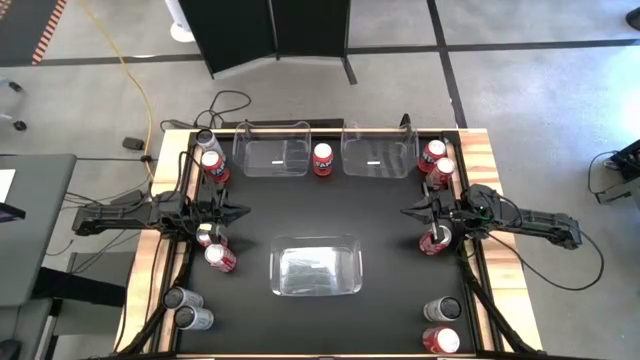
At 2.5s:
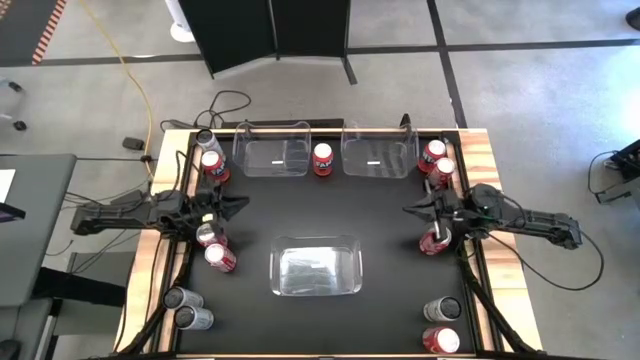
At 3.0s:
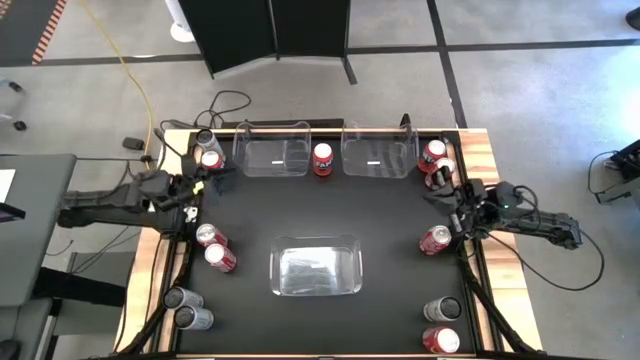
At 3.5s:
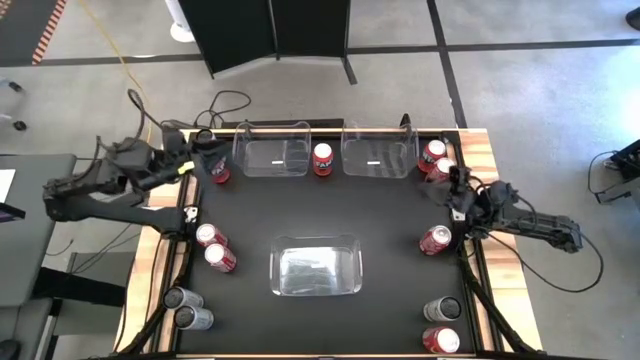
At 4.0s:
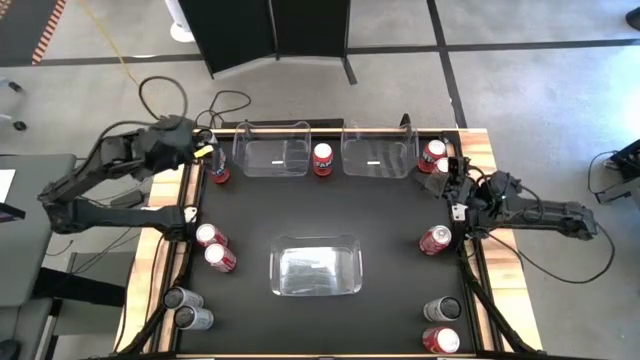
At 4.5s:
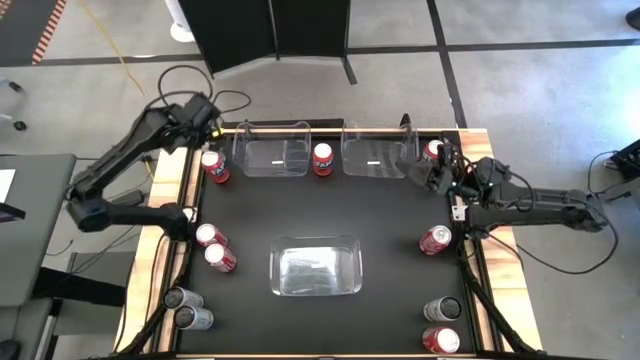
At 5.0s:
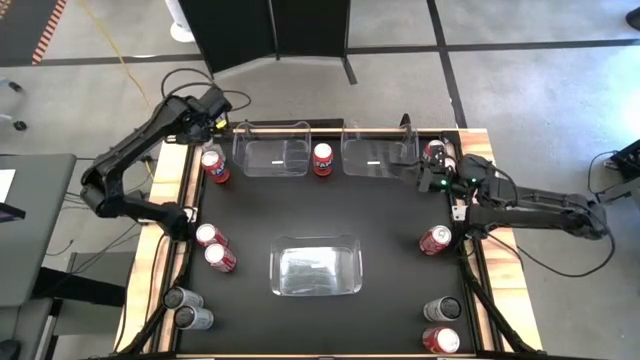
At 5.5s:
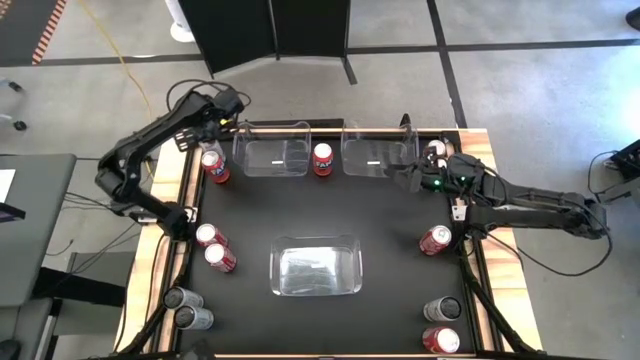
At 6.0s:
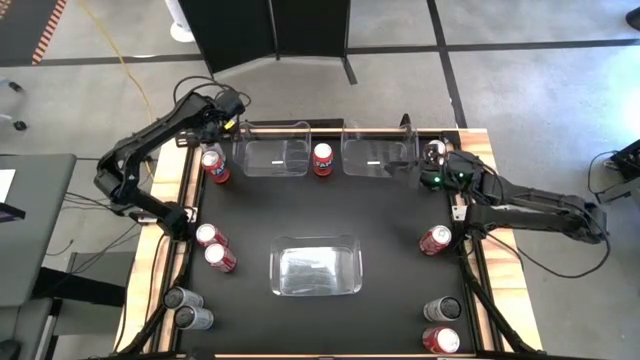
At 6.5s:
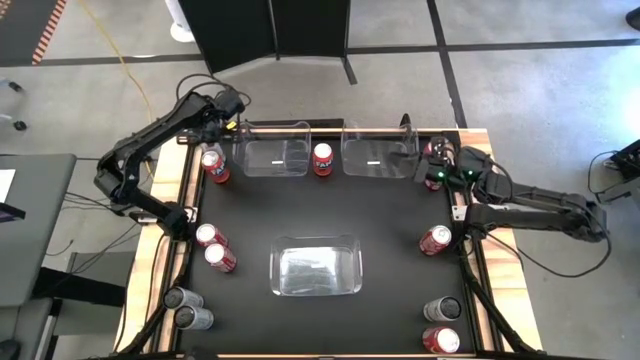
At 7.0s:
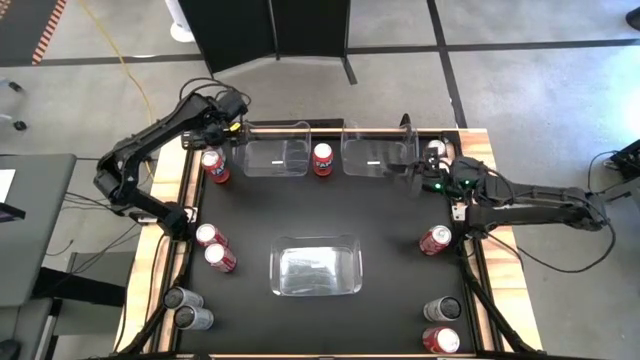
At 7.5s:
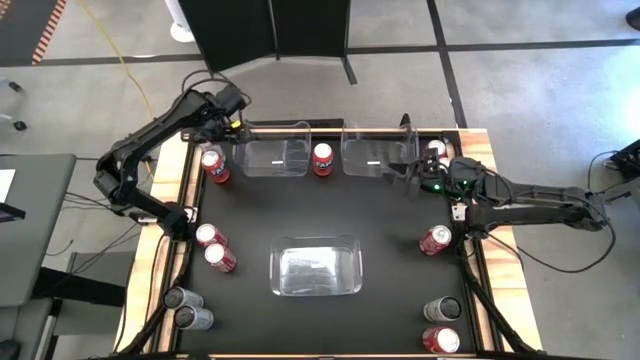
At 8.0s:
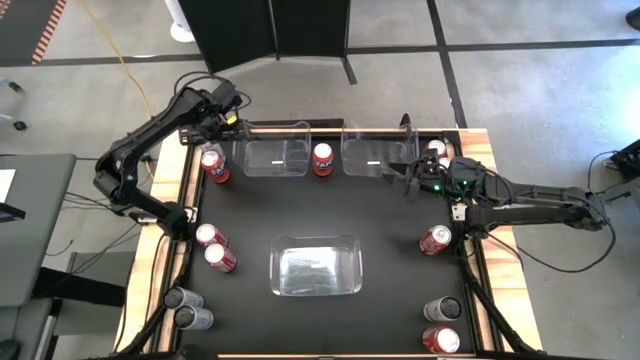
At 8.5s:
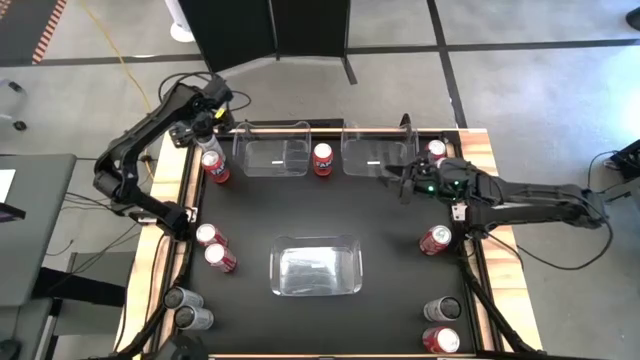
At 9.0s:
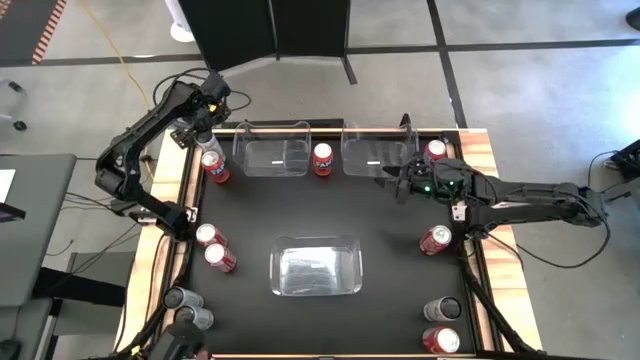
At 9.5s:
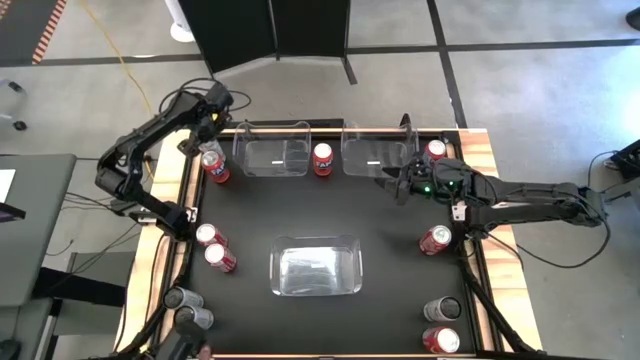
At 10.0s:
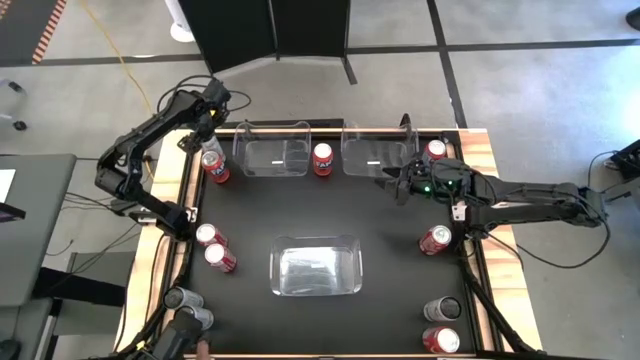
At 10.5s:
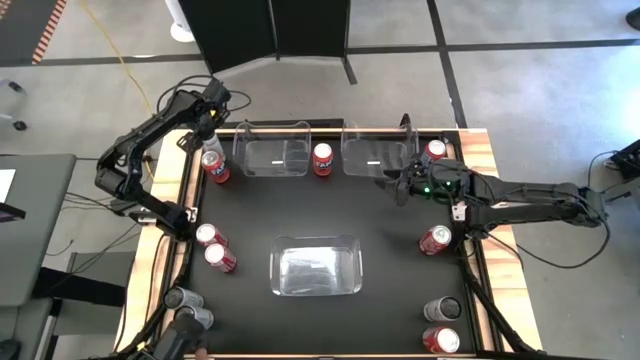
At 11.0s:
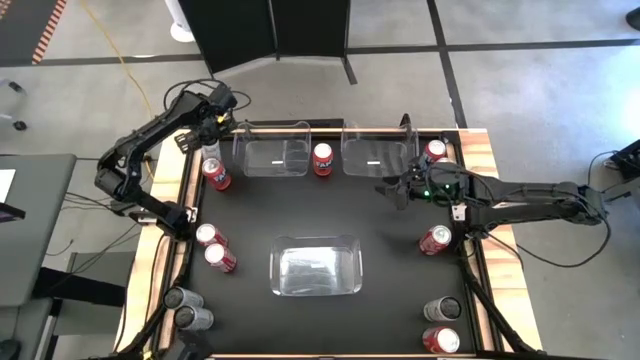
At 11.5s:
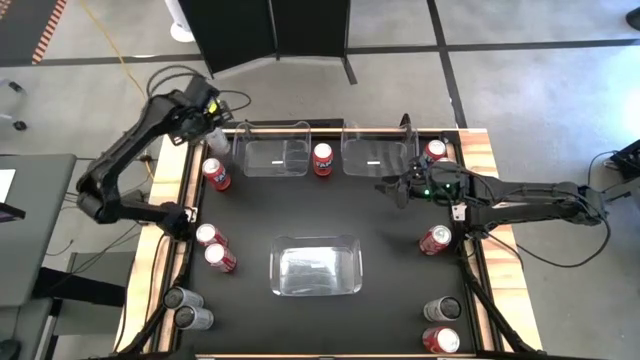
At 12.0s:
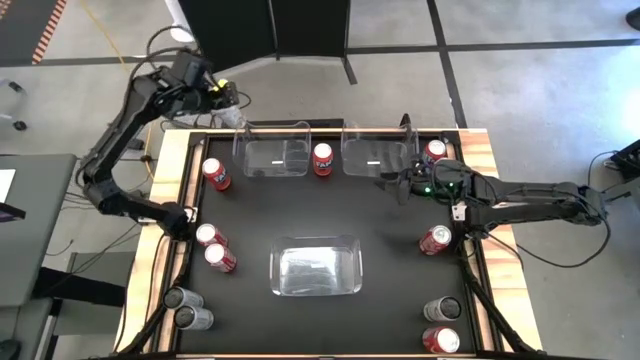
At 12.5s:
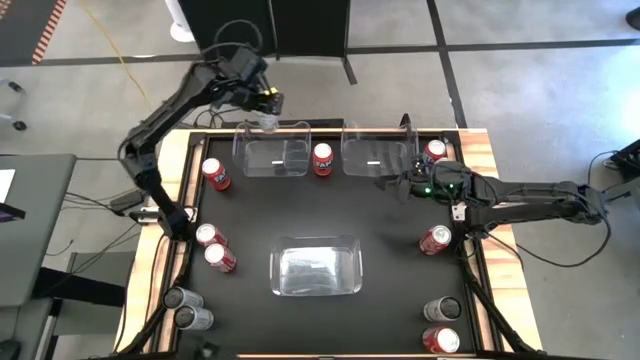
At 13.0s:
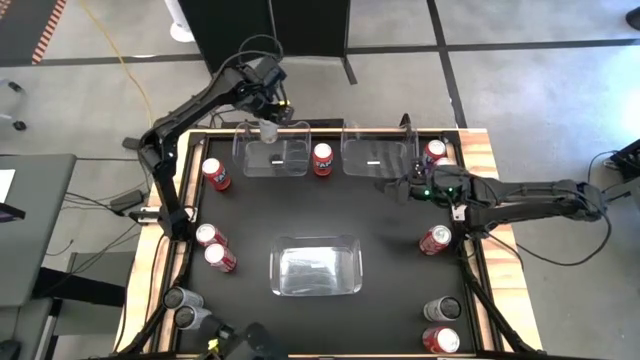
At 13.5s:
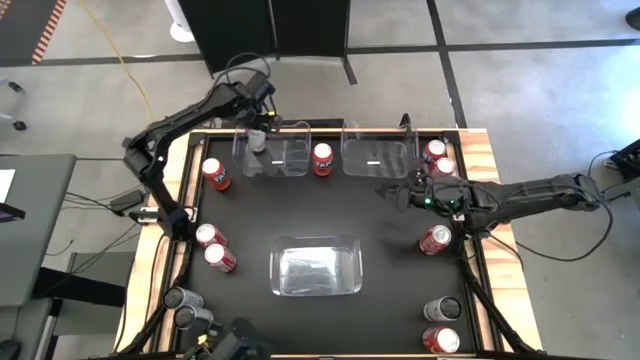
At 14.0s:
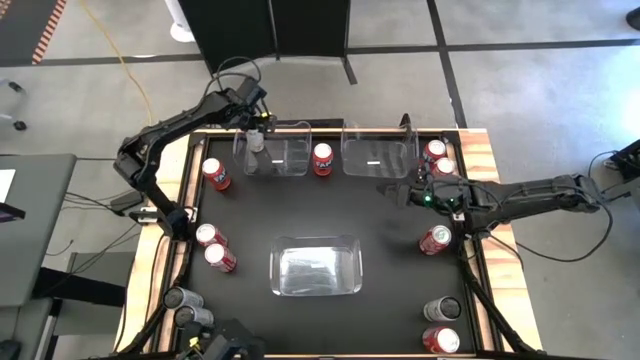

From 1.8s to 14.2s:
Task: Sort soda cans
Put the top white-yellow soda can into the top left transparent bin

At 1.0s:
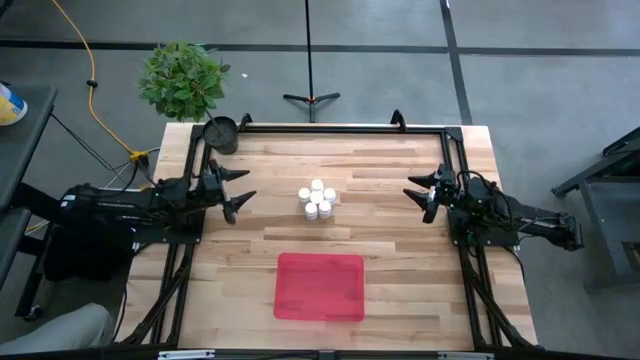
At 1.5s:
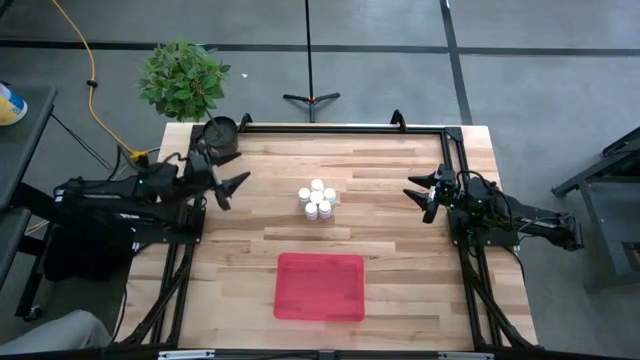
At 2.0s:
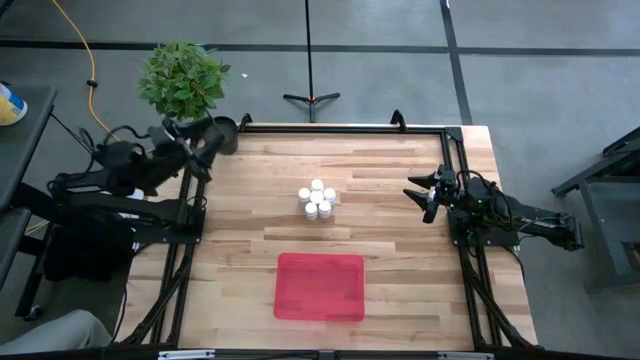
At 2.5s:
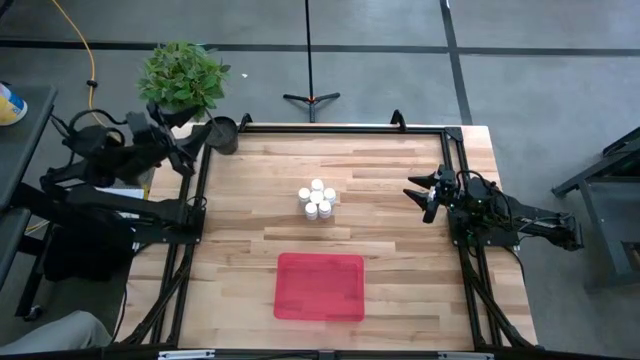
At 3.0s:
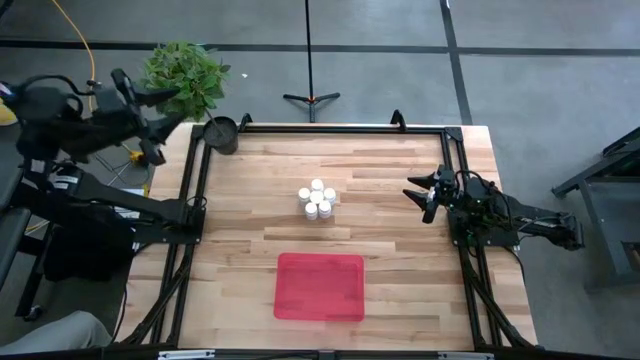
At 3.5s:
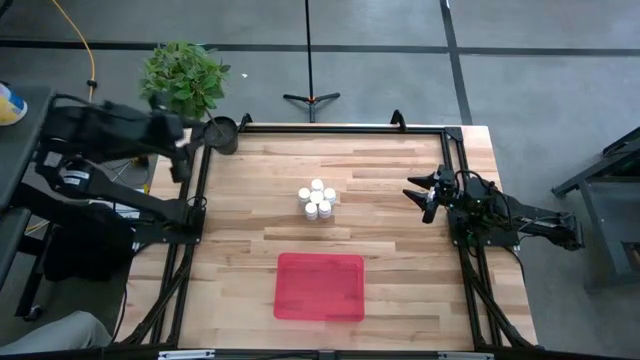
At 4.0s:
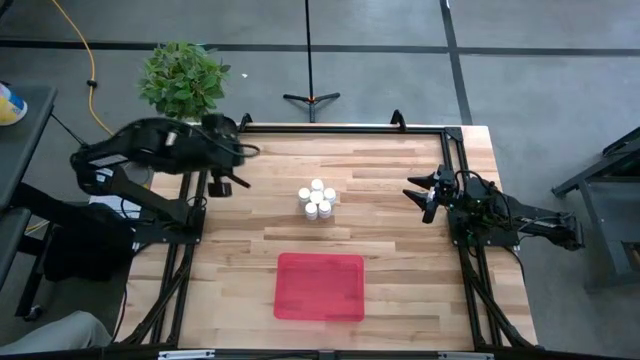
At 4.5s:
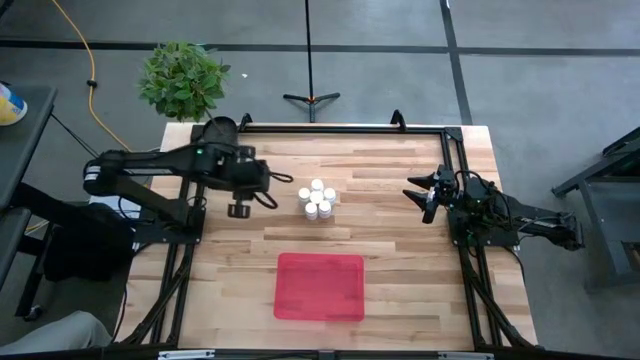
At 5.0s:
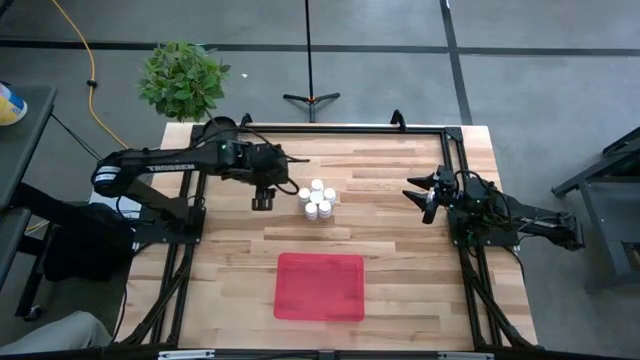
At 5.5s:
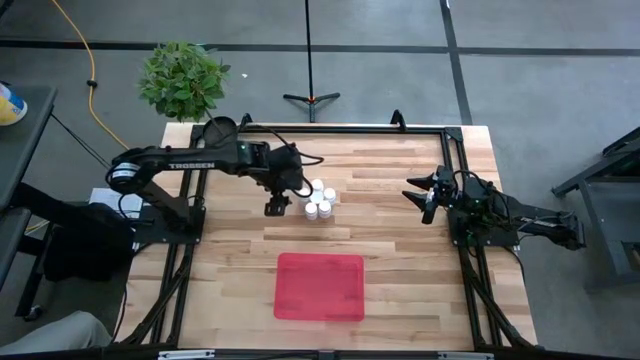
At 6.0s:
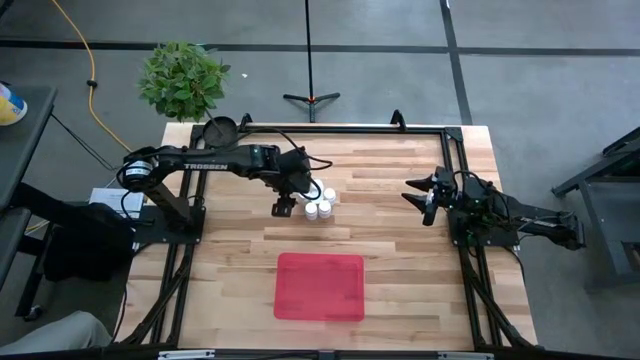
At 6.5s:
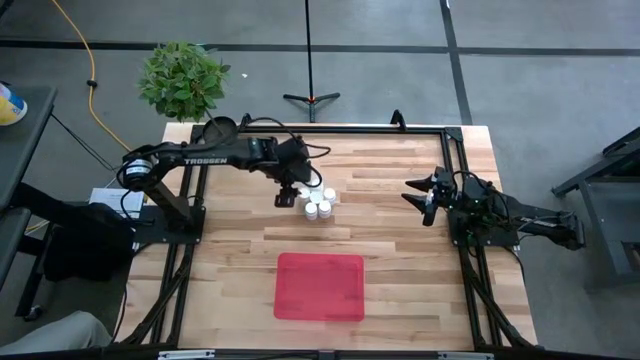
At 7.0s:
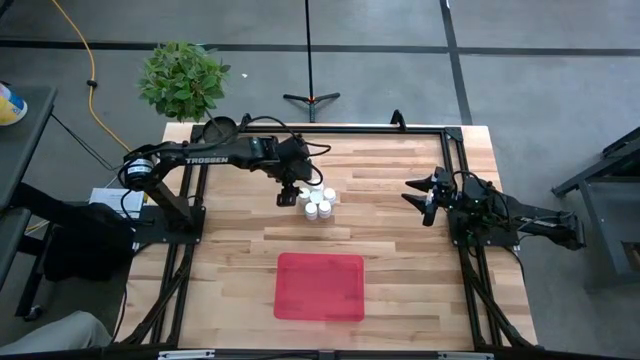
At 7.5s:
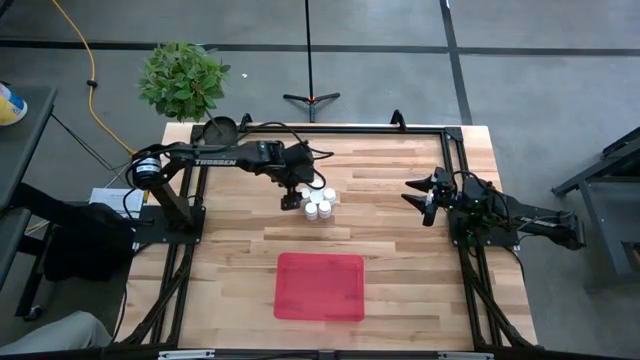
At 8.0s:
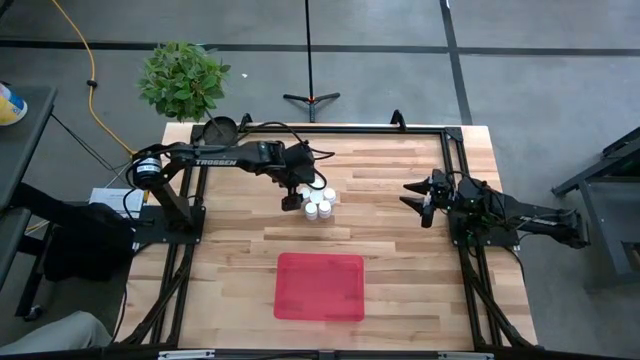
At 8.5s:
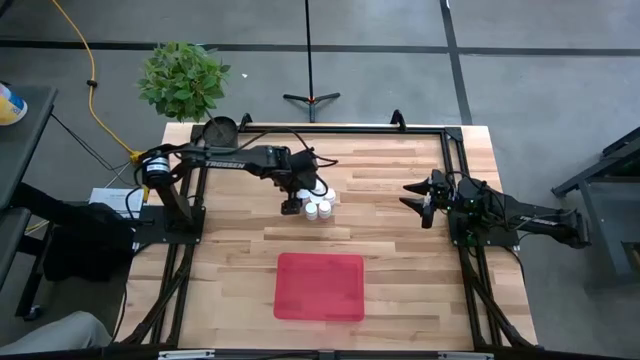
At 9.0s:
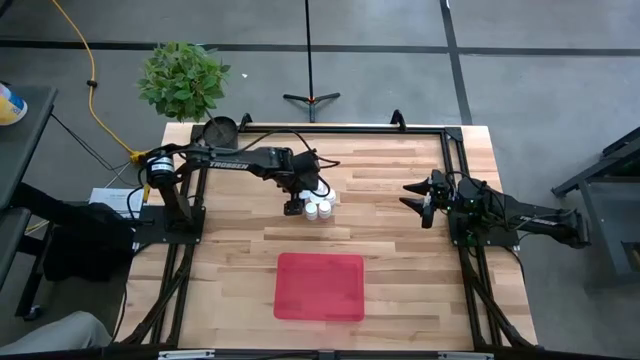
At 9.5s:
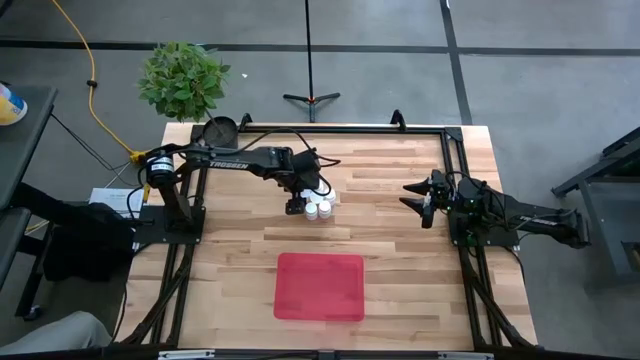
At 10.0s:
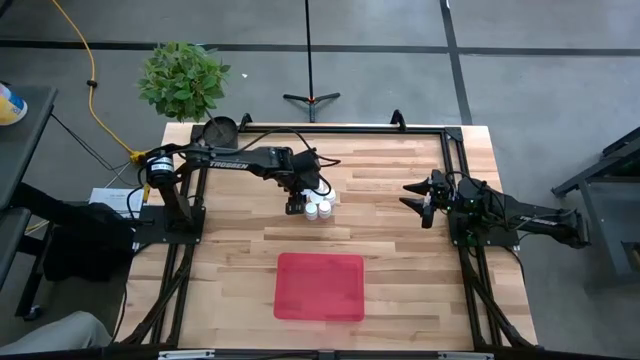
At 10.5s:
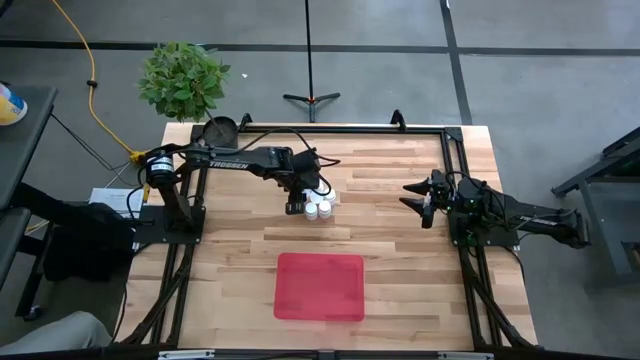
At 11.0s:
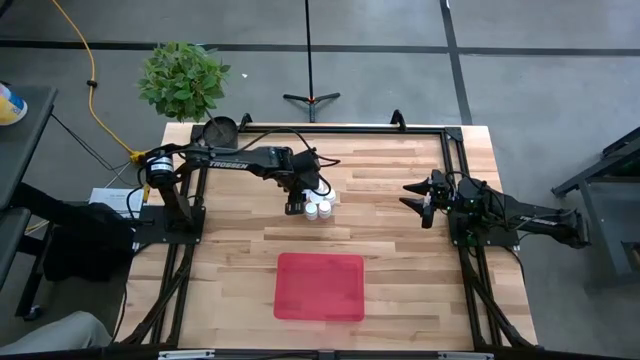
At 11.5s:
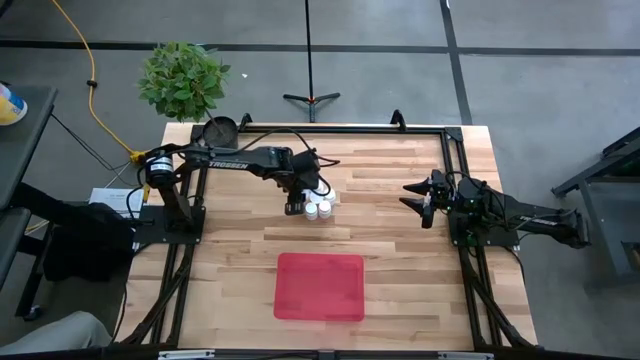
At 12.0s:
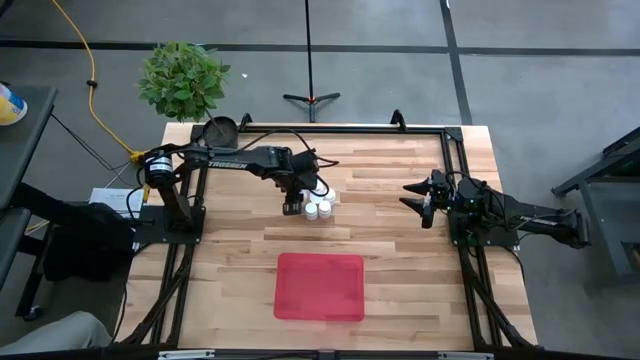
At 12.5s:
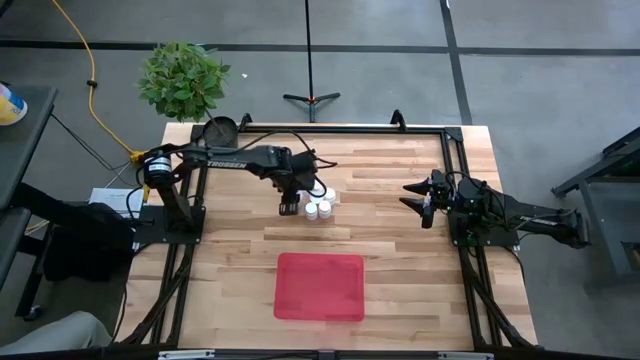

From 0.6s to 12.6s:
Task: Pick and place pill bottles into a basket
Put the white pill bottle into the red bin
